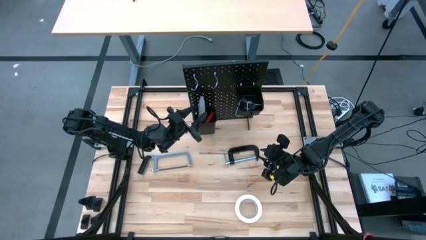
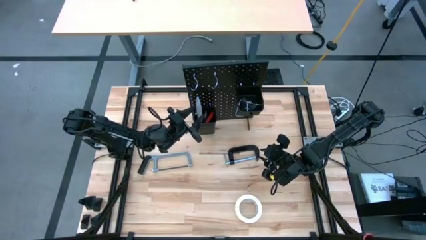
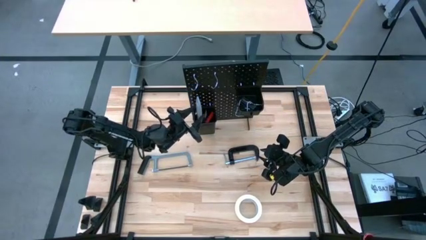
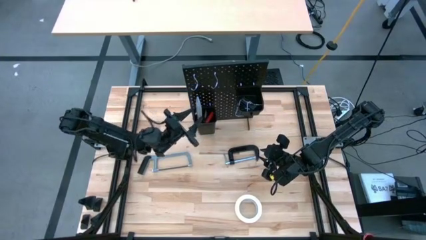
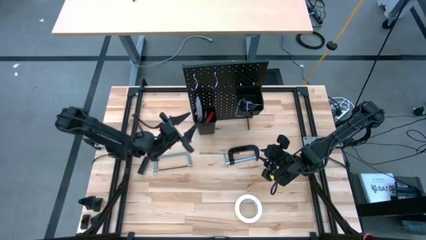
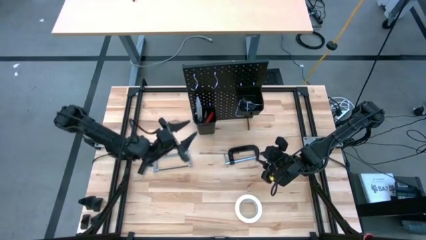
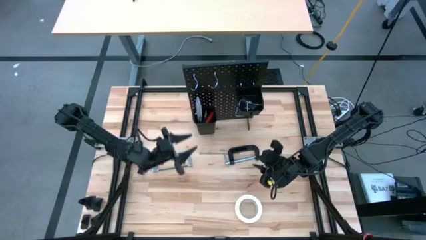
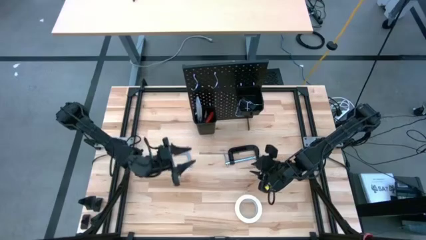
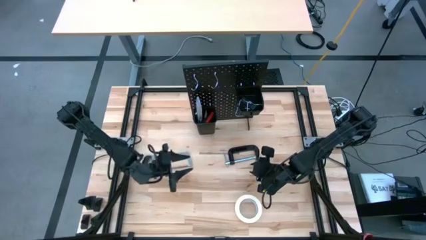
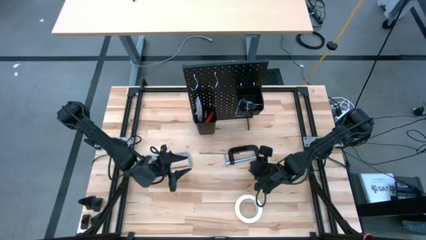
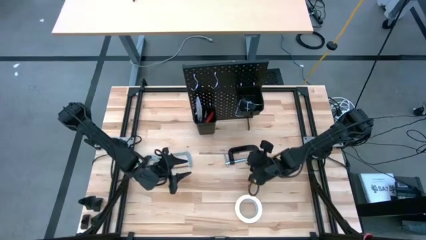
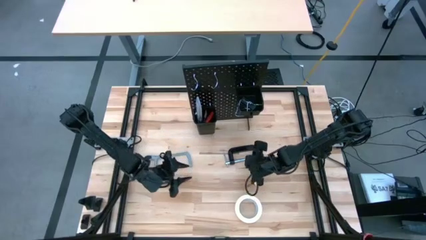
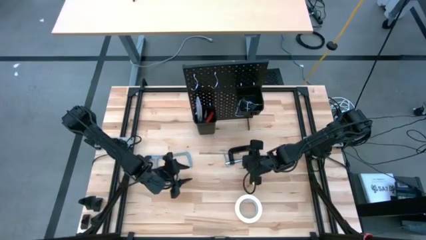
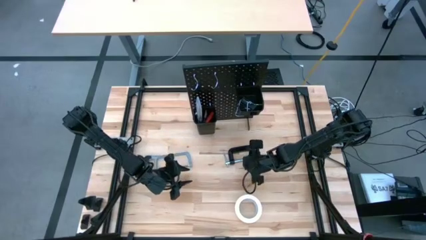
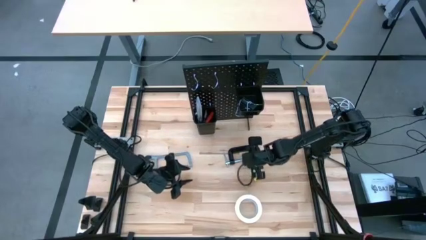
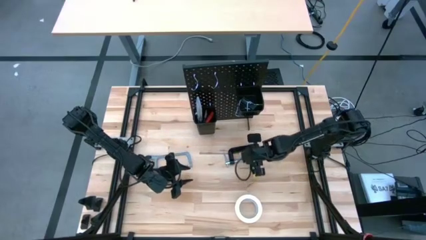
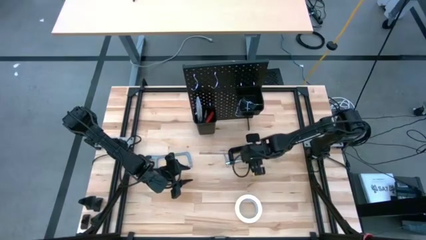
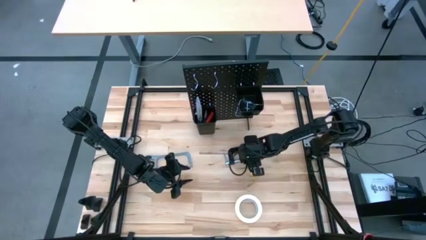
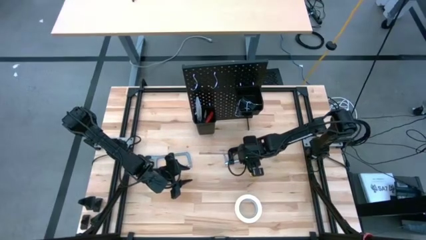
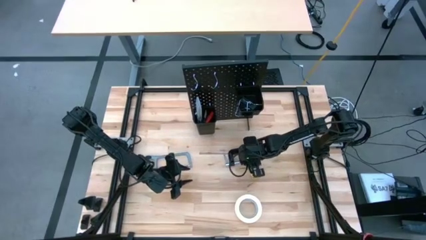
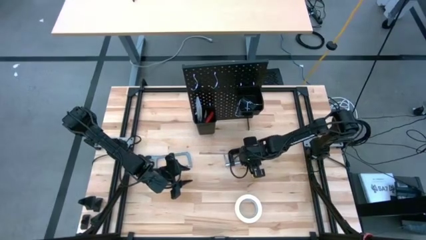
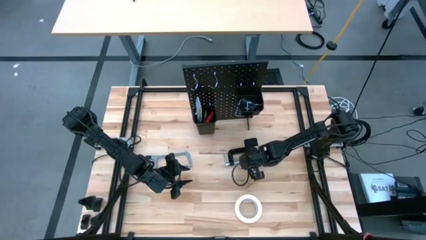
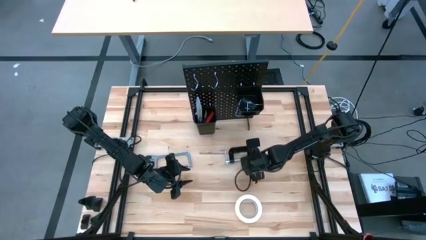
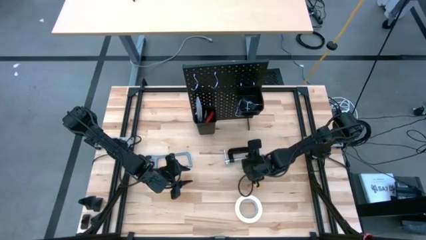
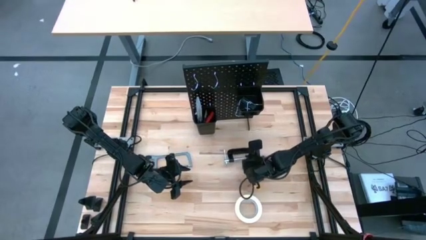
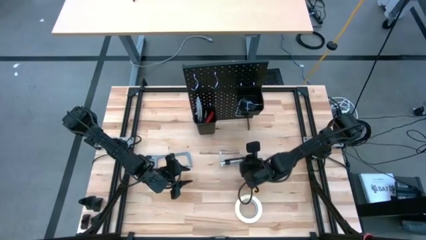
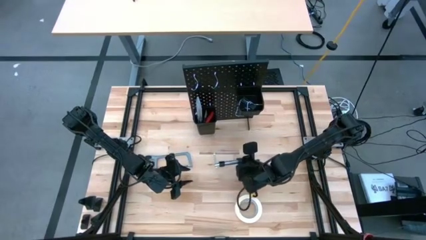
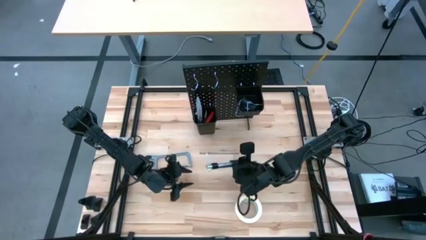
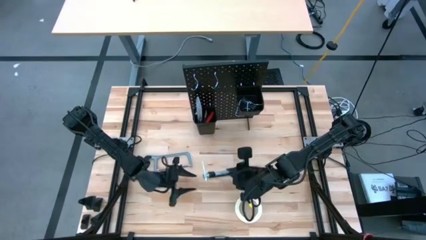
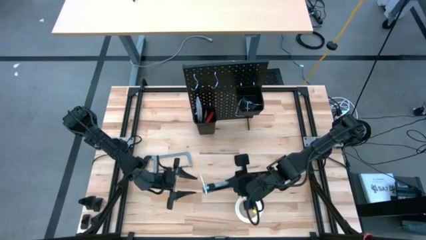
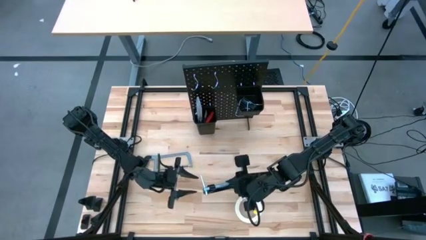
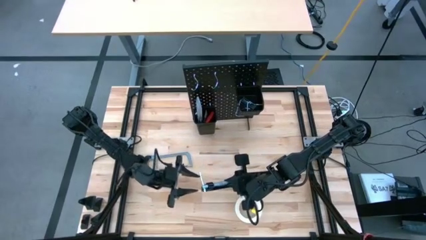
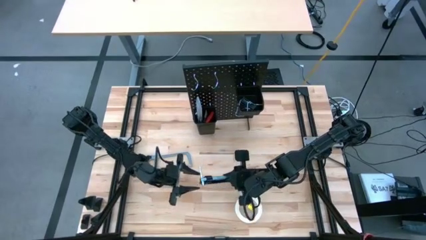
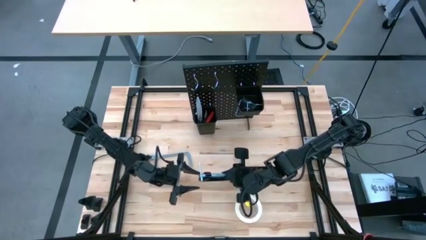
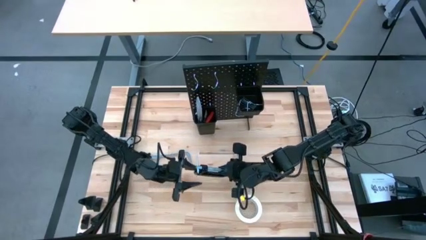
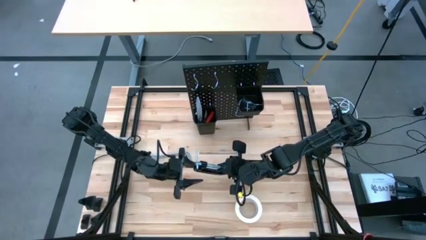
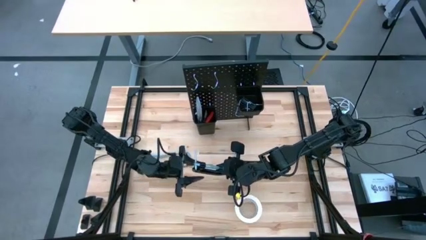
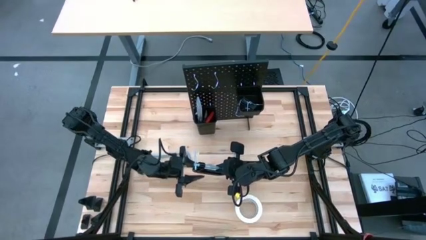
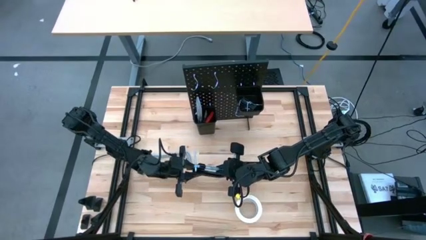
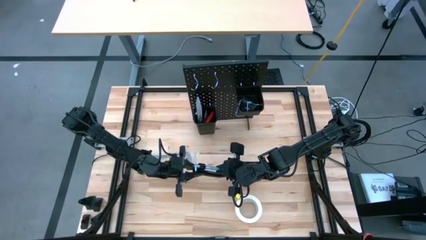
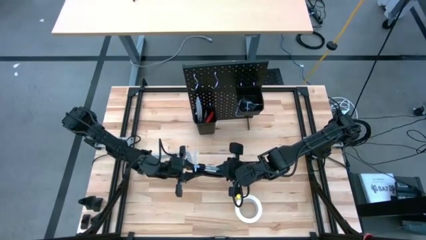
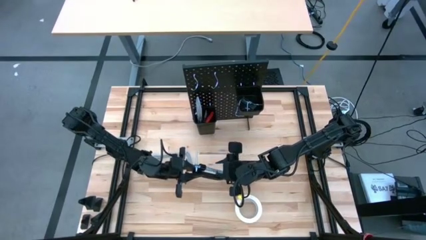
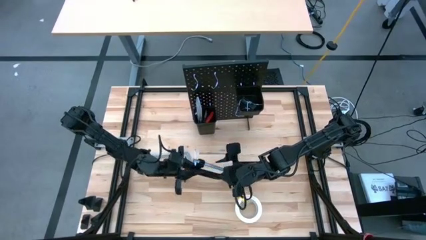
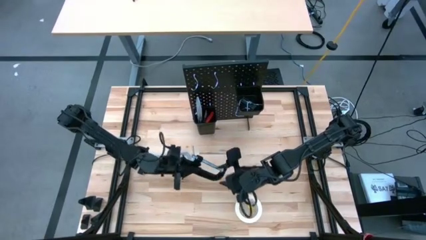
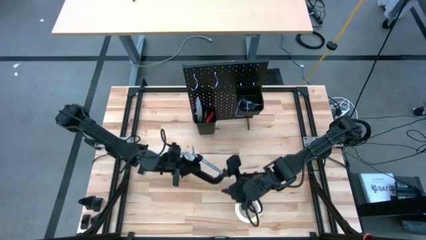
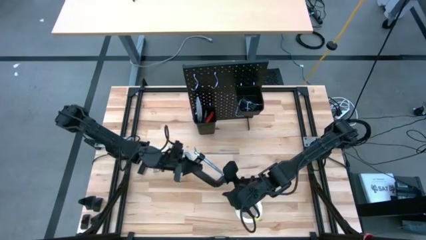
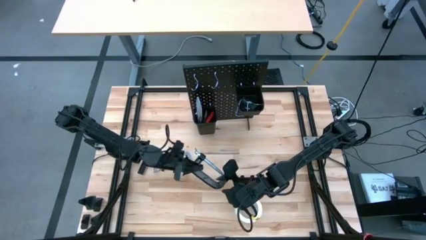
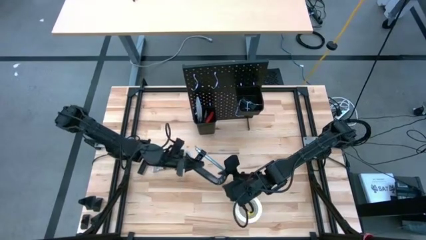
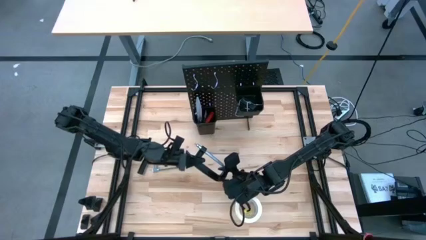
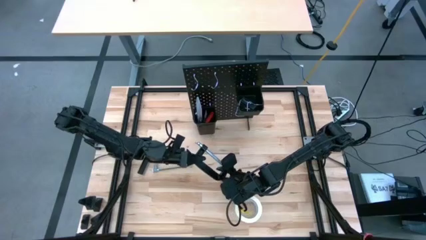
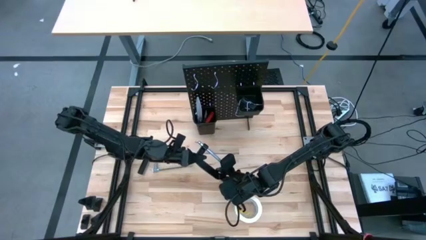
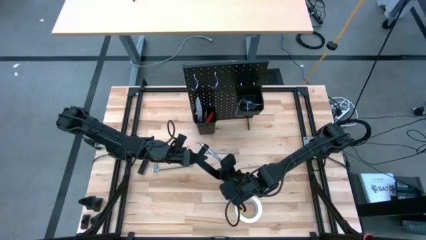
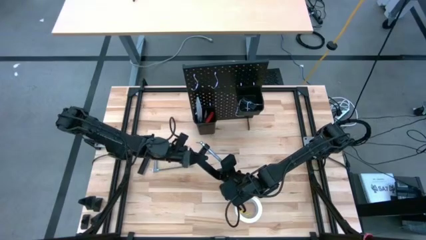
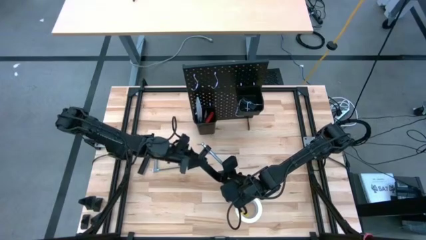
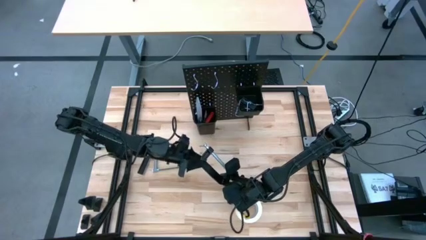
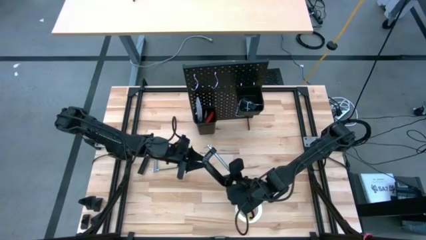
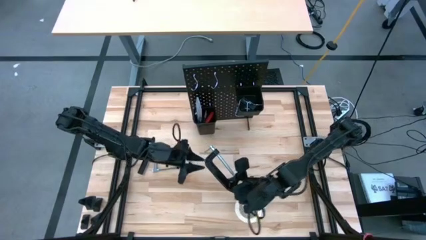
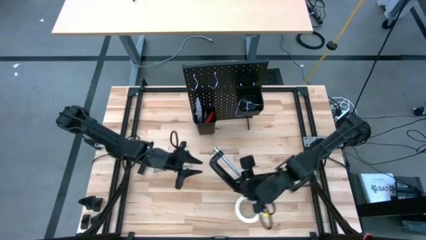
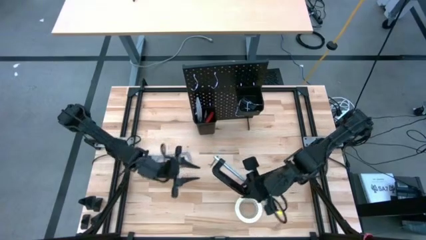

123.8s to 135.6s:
Task: Hang tools onto peg board
Hang the clamp on the pegboard
